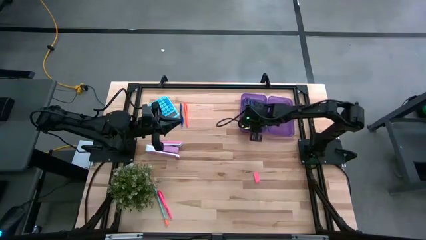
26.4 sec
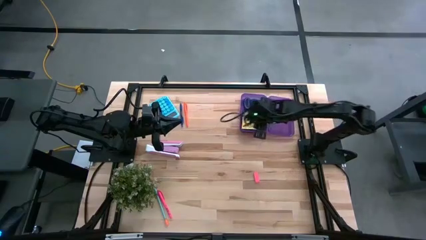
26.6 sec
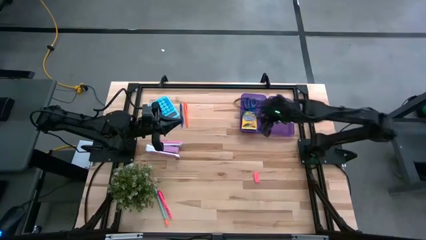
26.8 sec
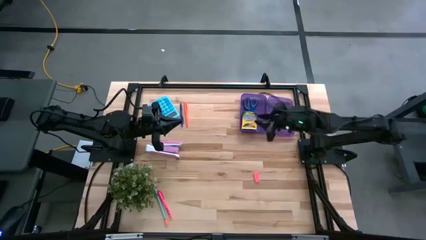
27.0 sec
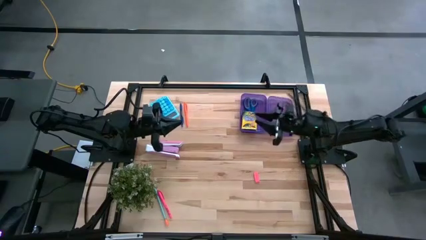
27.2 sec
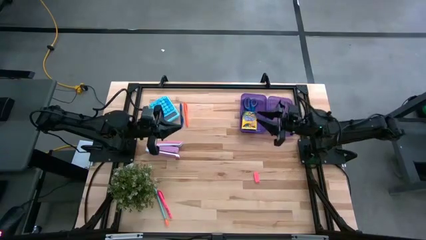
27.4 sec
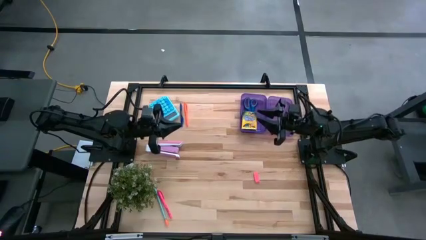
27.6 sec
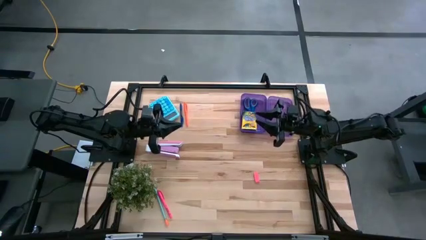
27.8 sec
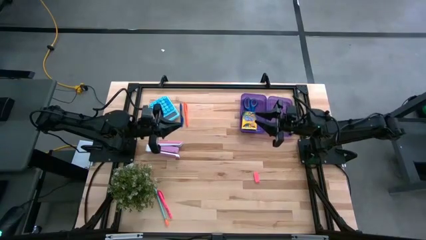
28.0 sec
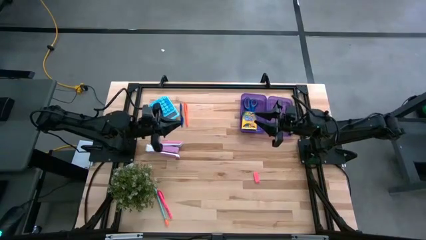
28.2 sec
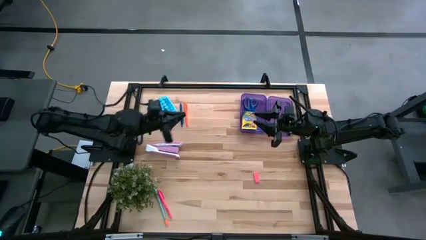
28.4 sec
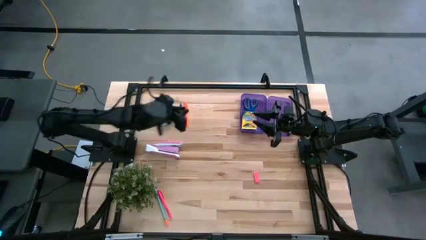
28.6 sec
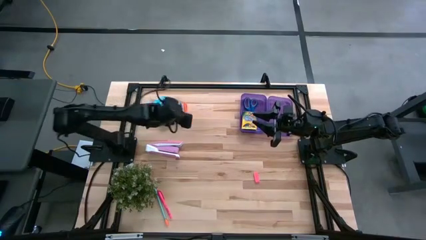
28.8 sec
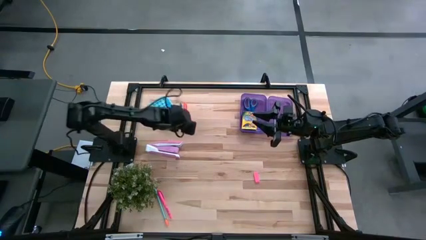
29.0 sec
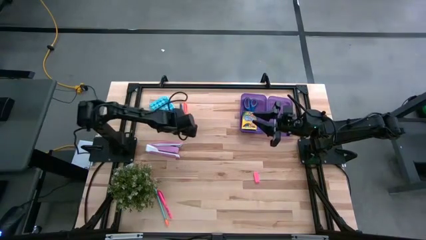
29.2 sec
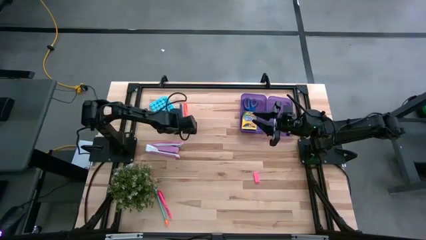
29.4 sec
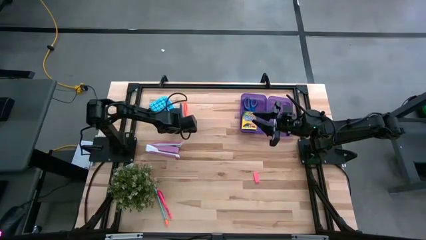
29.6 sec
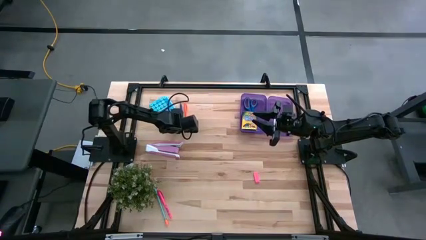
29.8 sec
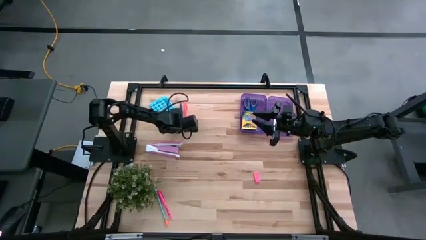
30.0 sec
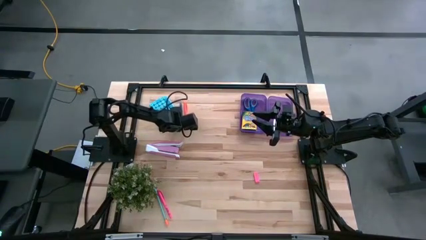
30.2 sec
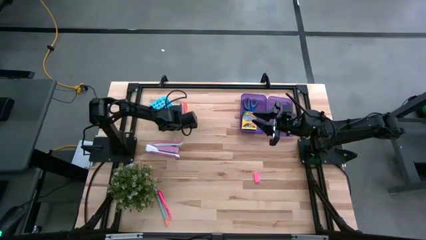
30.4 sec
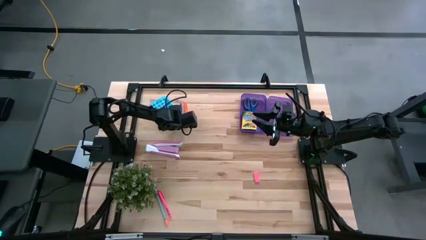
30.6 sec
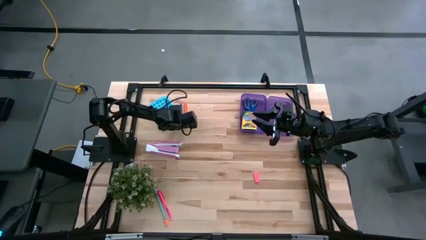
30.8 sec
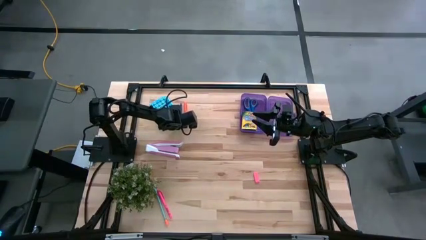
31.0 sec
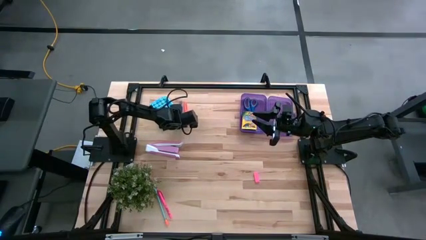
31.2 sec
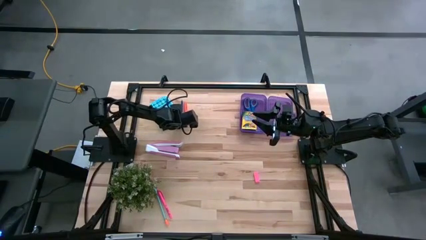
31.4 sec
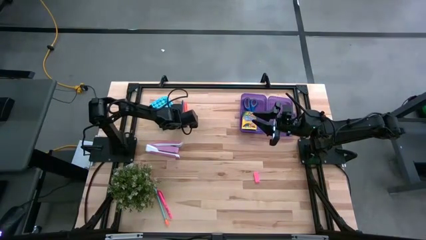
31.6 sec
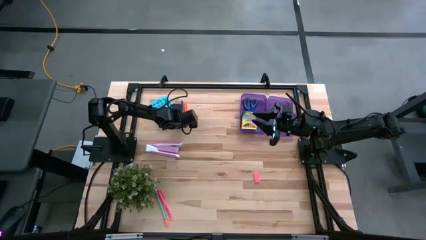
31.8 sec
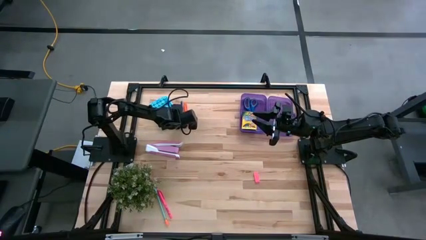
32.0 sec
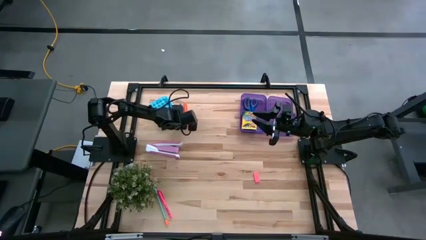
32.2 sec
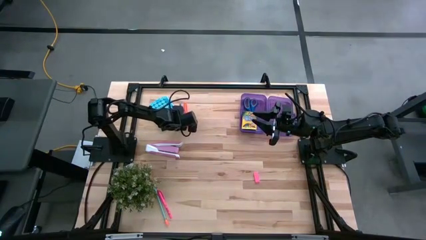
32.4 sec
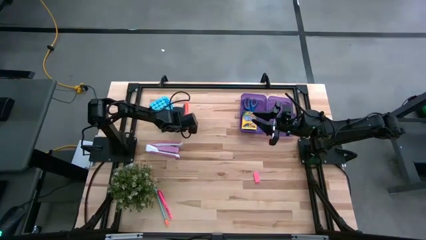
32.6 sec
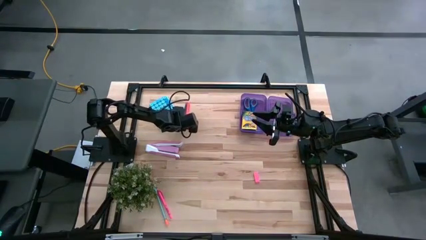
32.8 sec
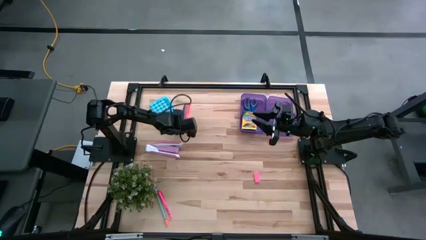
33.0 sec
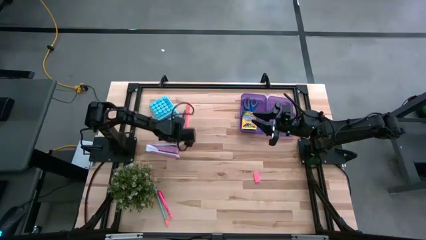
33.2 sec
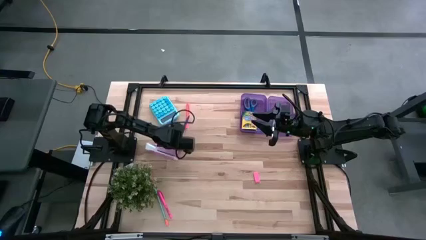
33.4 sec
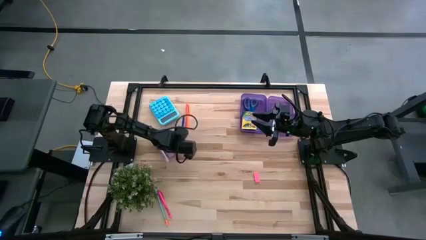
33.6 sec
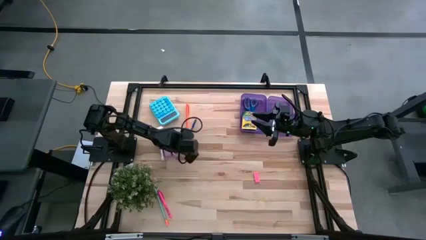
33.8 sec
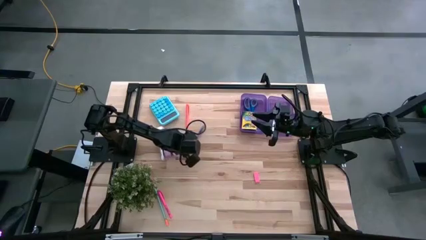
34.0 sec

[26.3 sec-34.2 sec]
Task: Pack school essentials
Put the blue pen into the violet supply box

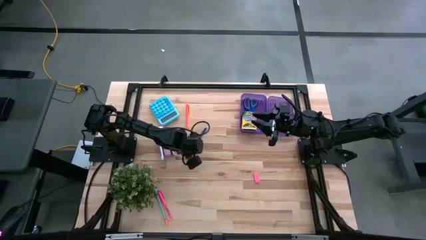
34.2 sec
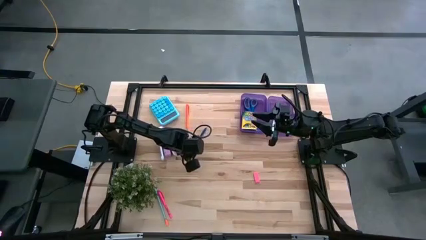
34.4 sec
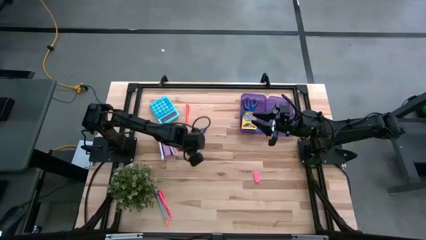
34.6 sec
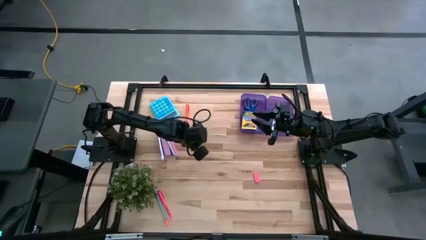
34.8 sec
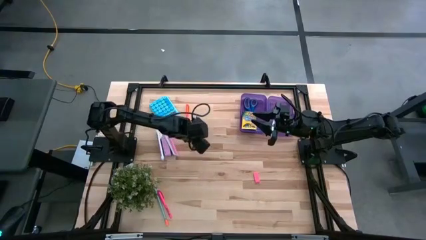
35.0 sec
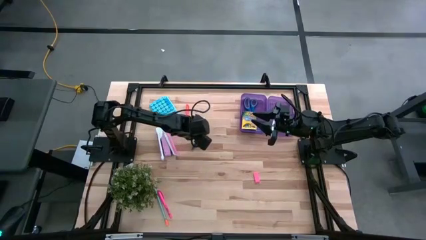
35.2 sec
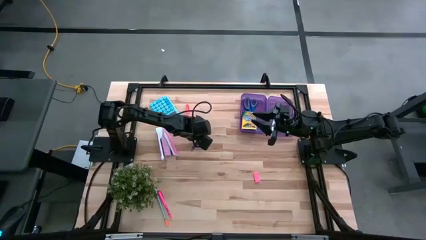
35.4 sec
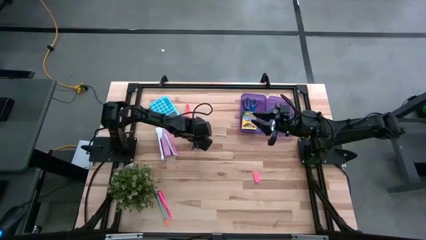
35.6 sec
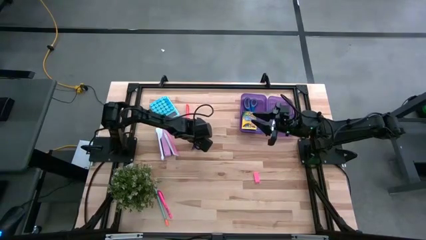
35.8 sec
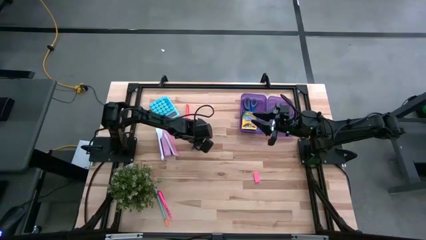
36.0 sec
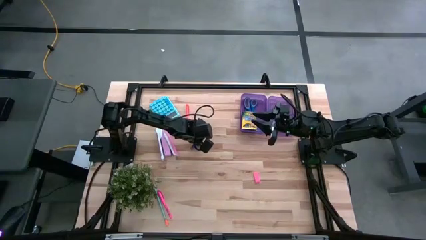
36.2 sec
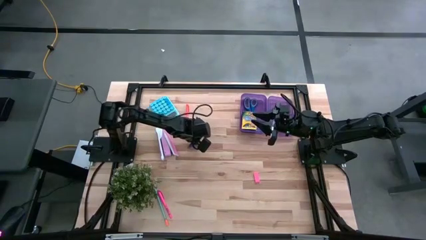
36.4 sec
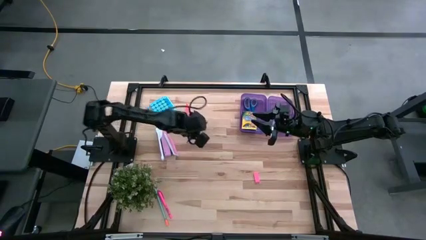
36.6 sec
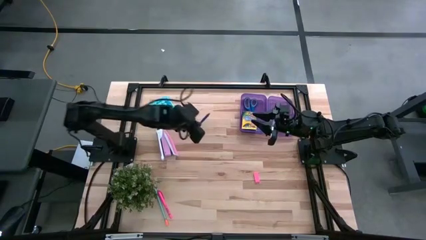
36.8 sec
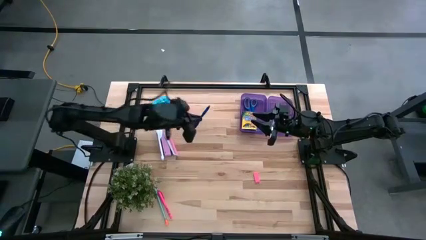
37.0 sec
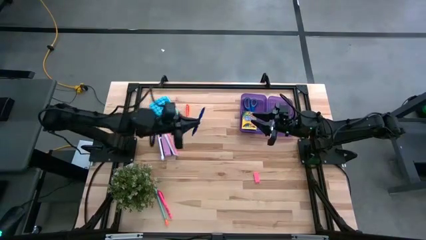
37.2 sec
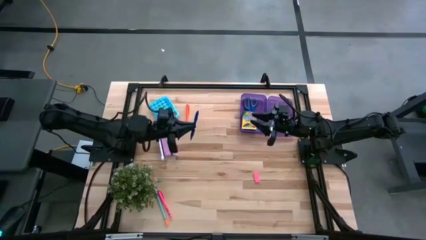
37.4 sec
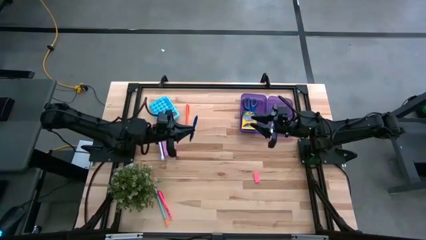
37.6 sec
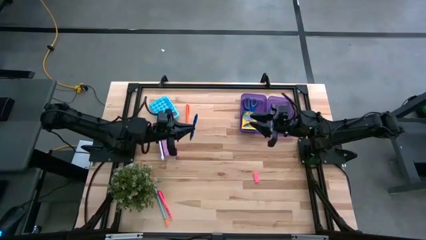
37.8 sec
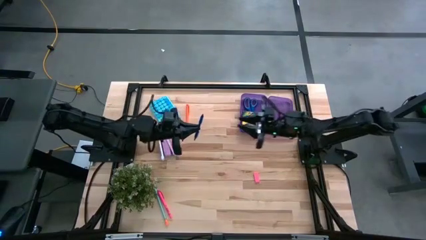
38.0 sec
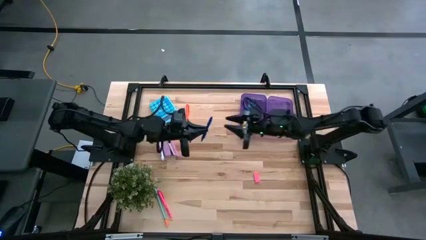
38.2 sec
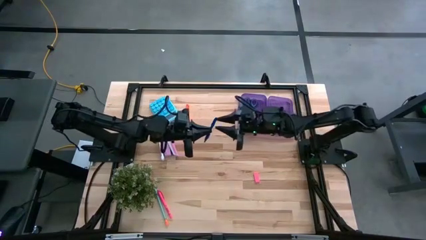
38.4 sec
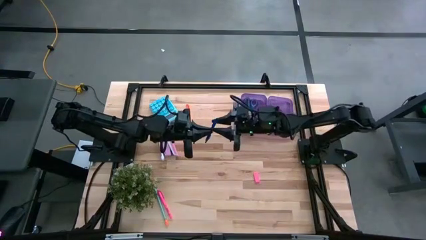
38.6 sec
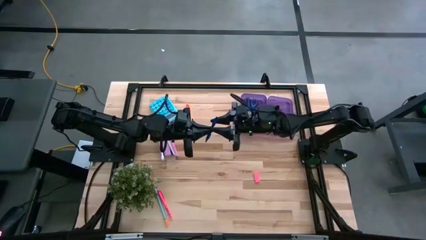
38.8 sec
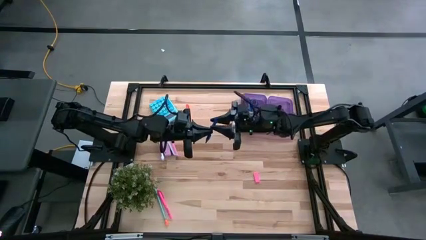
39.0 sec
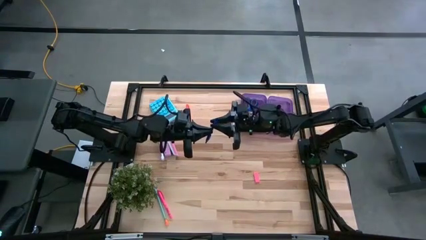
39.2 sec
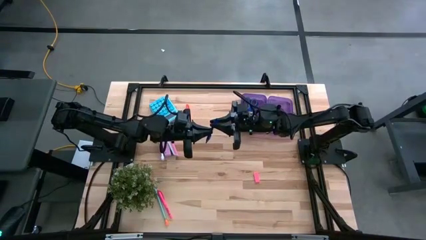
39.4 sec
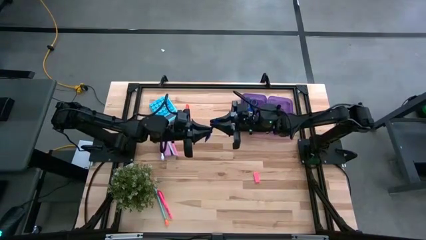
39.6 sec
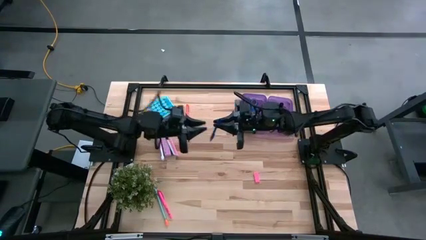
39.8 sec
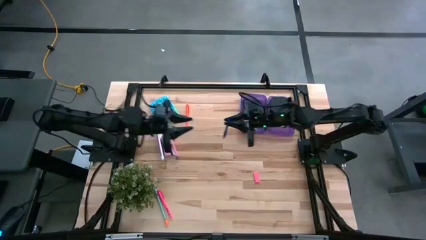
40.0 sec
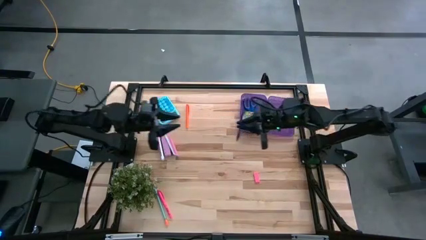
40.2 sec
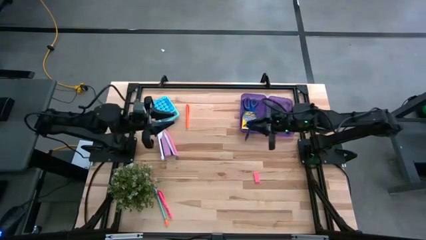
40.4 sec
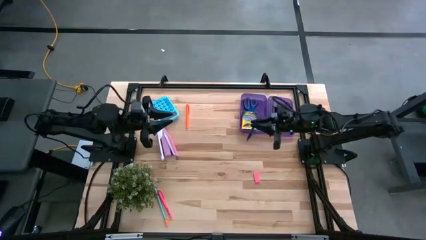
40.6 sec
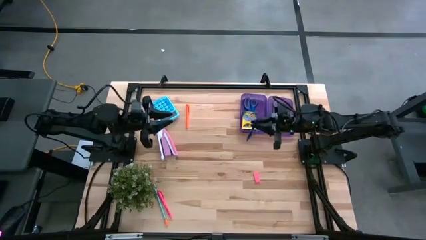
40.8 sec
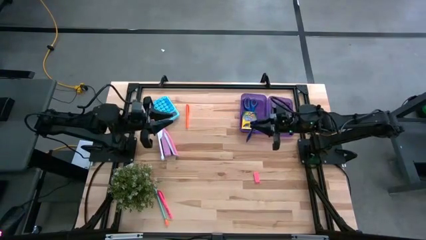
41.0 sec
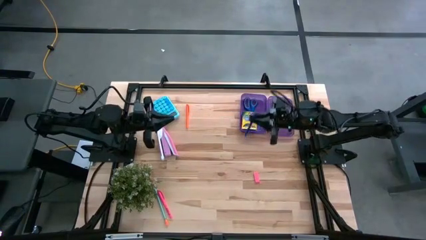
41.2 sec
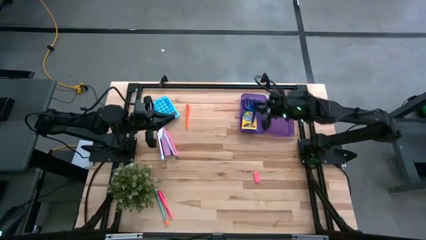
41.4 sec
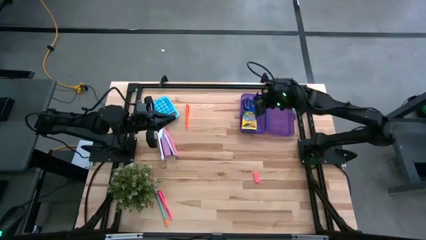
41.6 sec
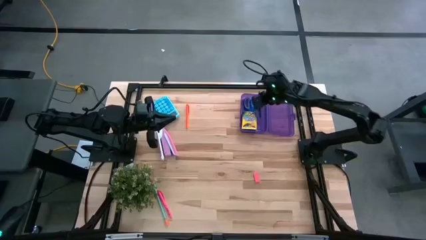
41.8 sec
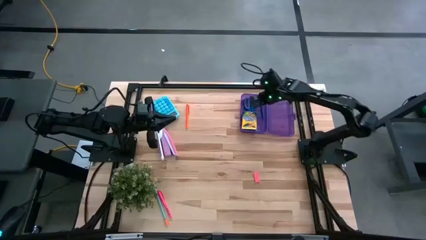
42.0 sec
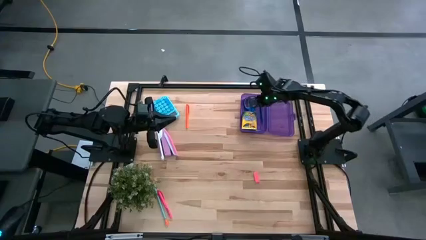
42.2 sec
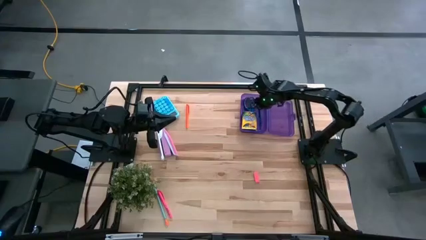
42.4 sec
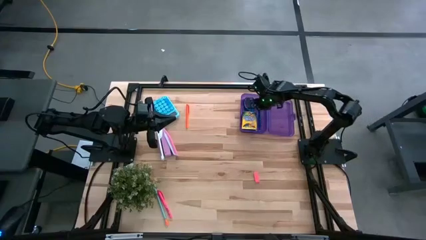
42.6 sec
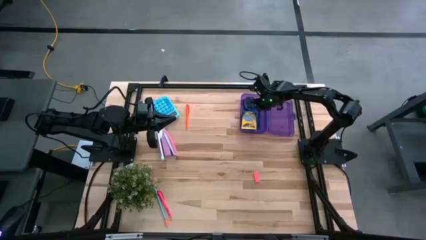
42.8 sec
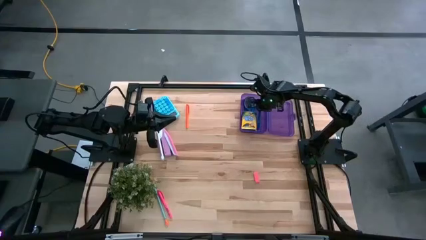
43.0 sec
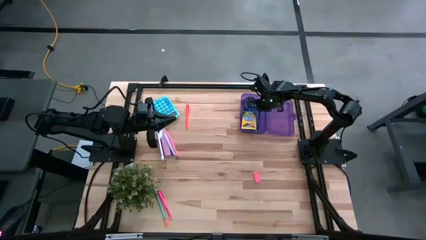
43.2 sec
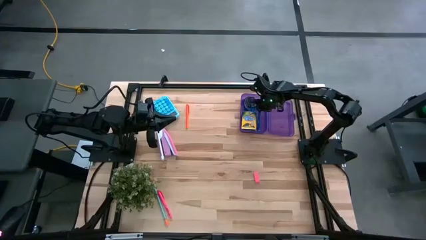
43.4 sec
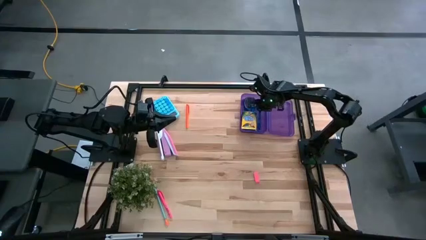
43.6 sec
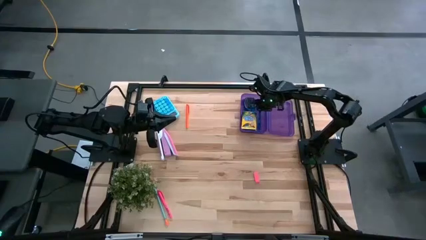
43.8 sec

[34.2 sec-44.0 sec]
Put the blue pen into the violet supply box
